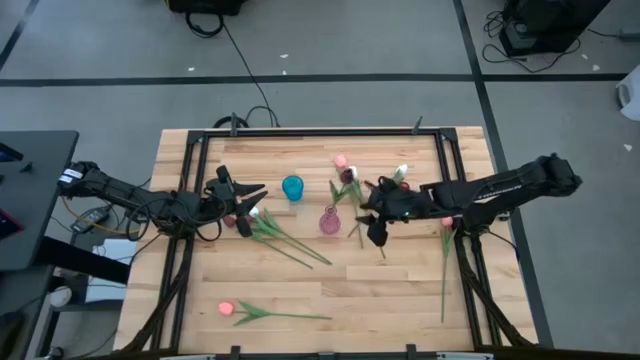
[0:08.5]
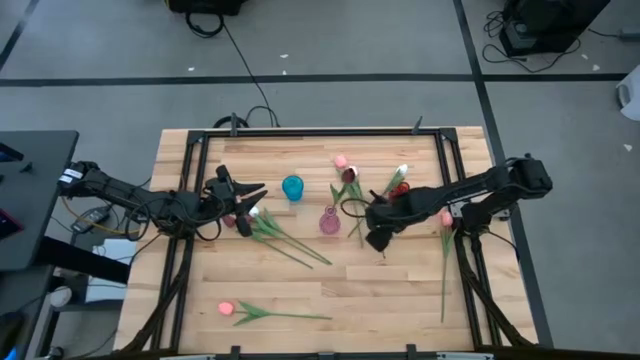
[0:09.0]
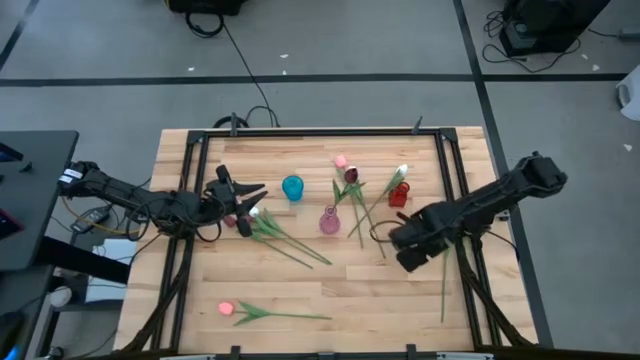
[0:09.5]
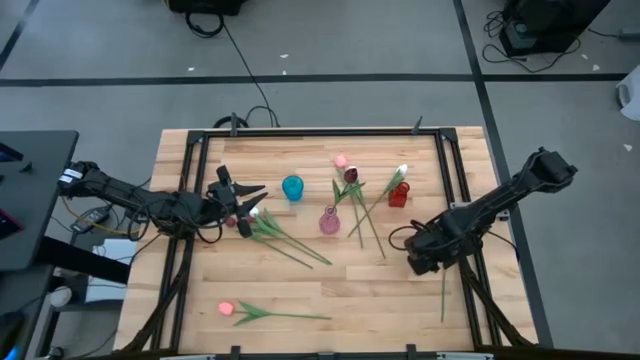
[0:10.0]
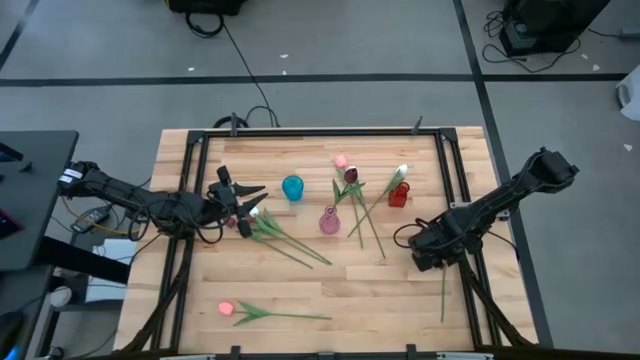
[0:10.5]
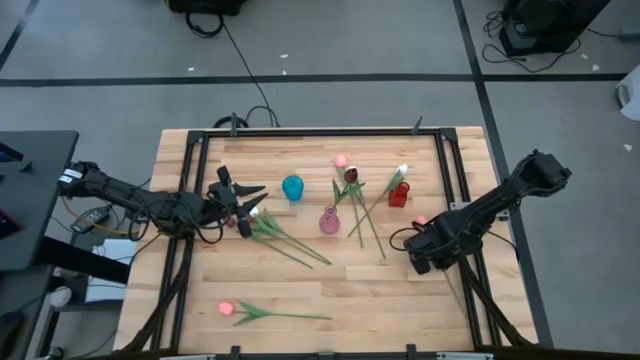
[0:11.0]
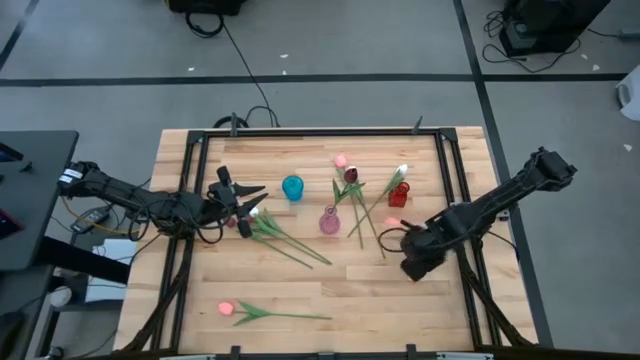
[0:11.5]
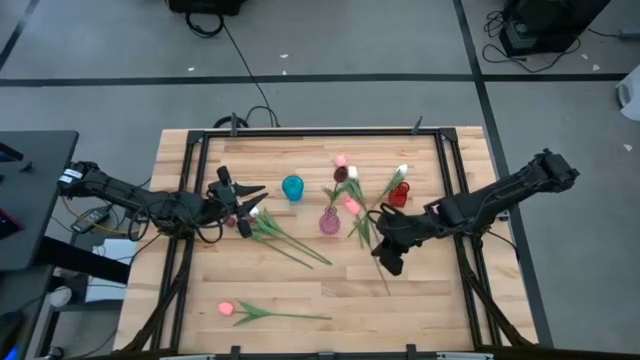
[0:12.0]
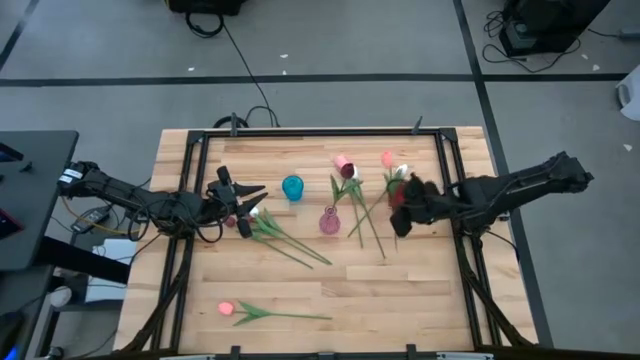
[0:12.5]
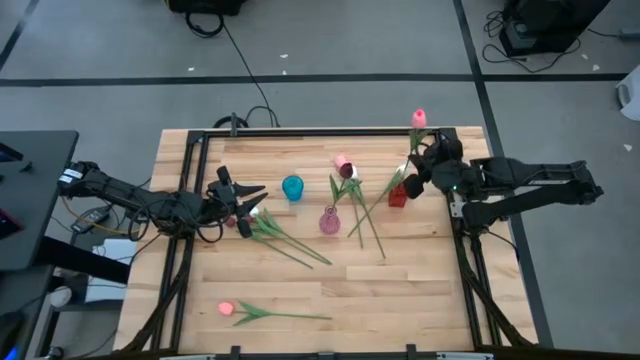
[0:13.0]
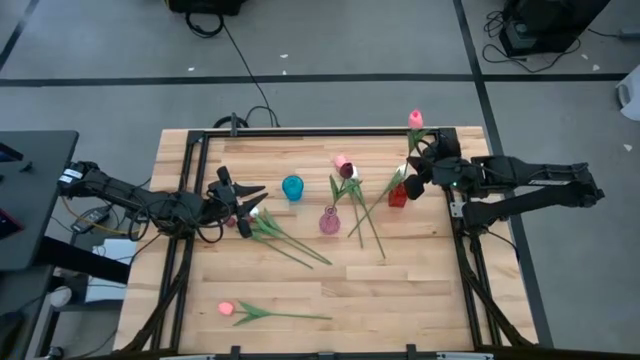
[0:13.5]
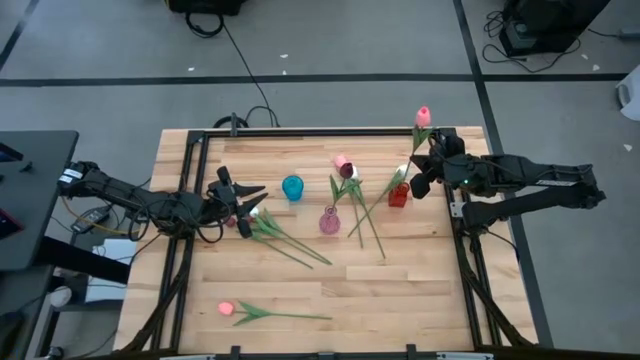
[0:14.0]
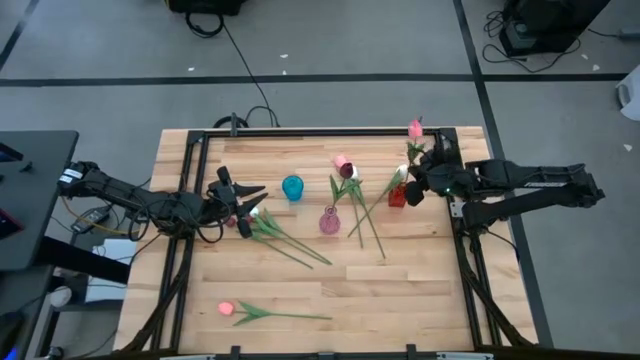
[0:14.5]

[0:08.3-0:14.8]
Task: Sort flowers into vase by color
Put the middle pink tulip into the red vase

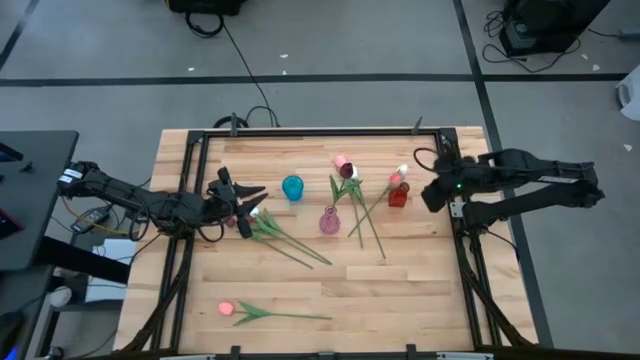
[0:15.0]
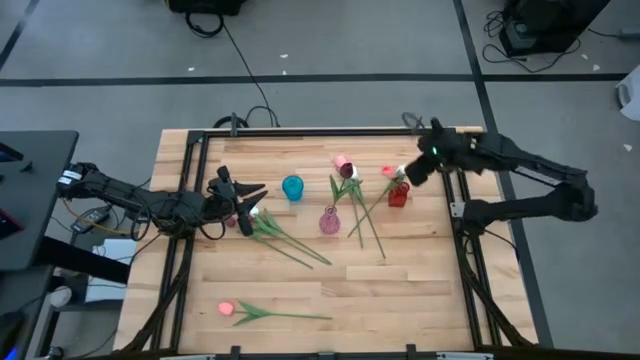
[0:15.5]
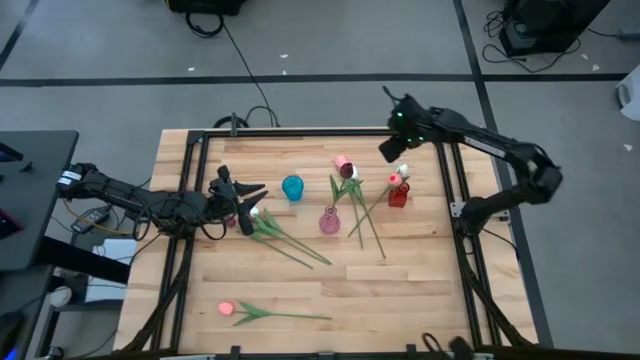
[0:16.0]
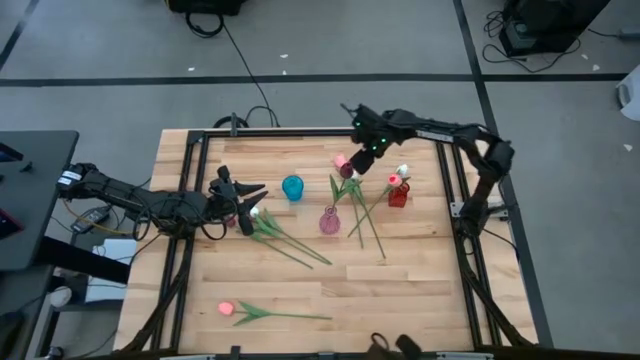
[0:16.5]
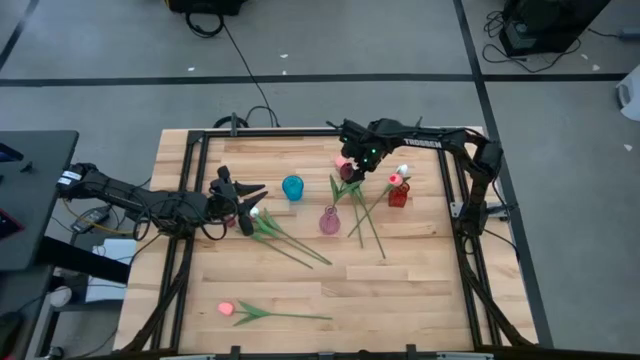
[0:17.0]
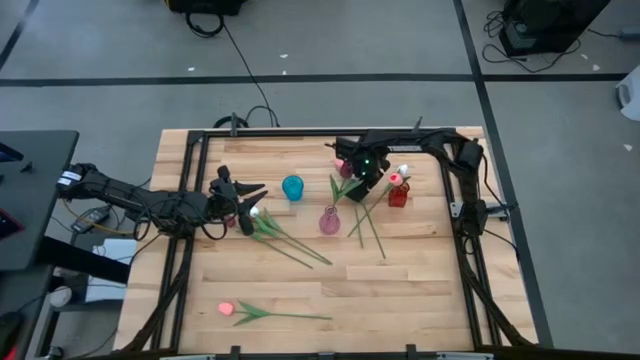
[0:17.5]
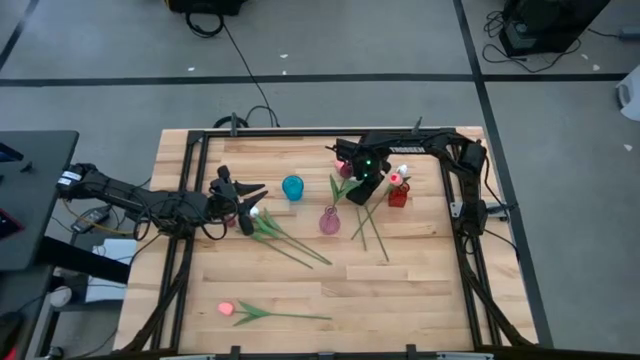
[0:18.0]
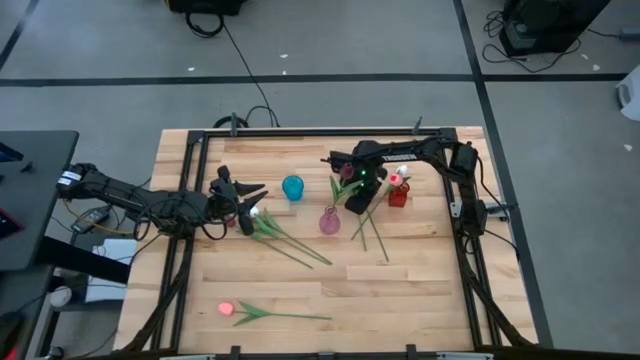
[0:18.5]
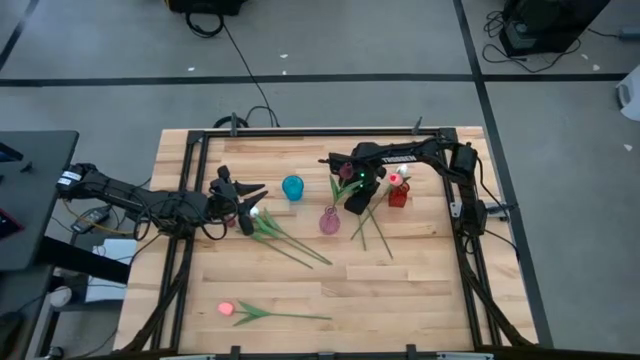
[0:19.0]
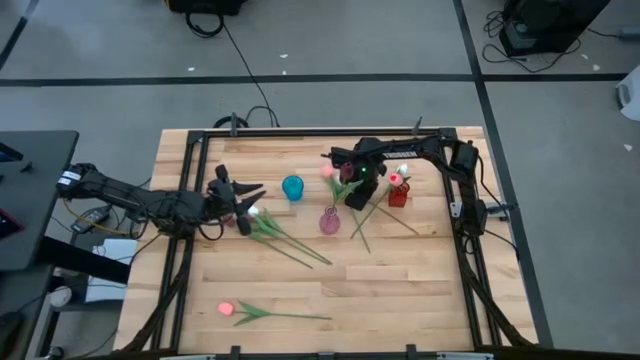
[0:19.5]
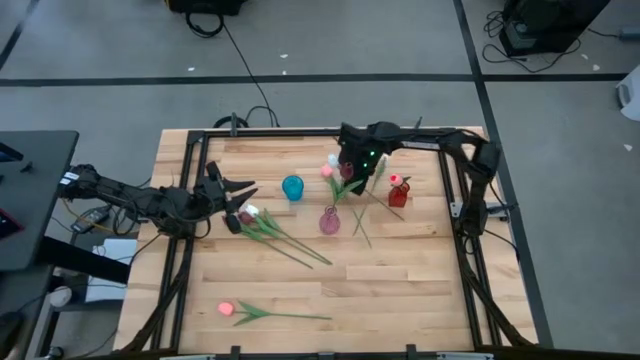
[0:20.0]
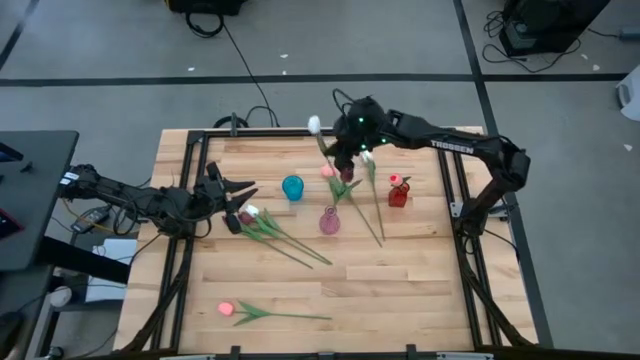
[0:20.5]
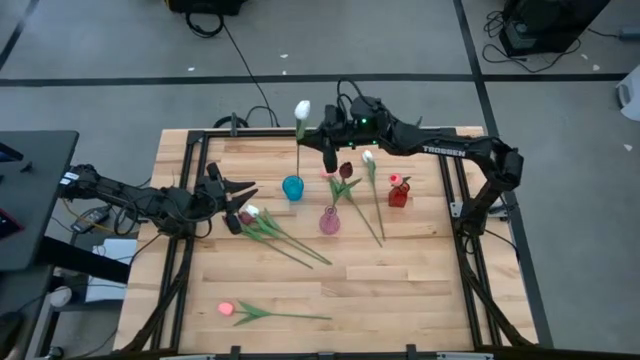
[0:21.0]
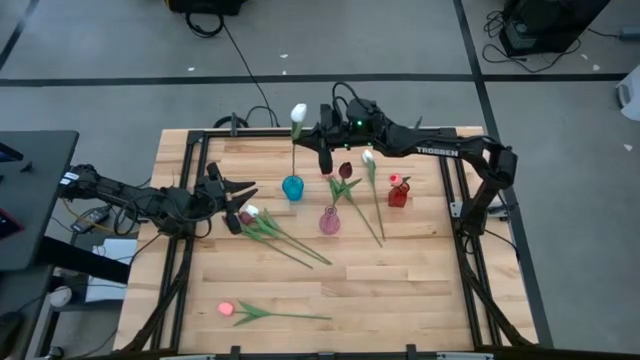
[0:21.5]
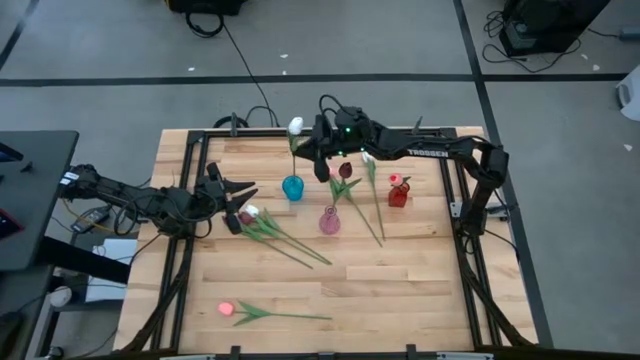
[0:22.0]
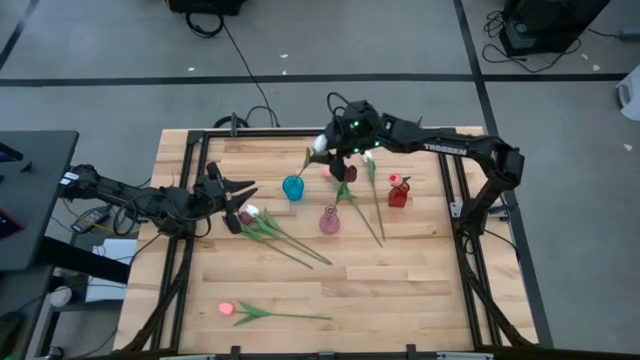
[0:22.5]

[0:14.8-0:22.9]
Put the middle white tulip into the blue vase

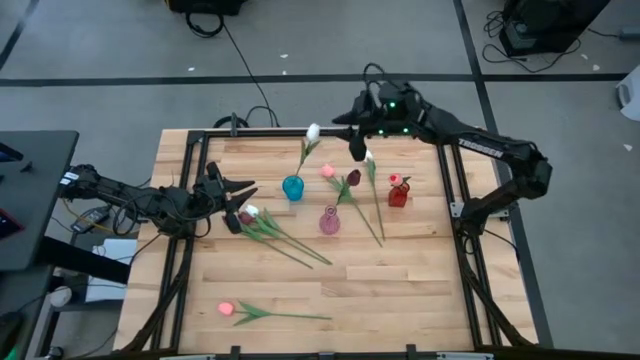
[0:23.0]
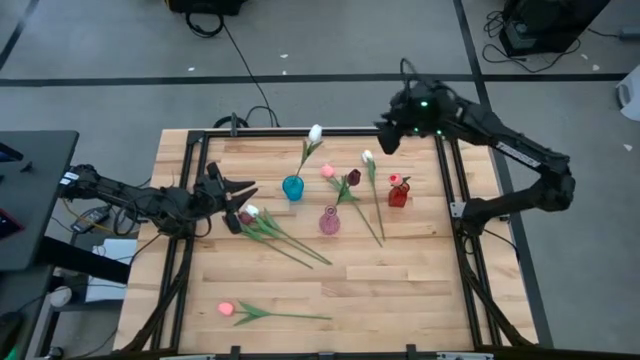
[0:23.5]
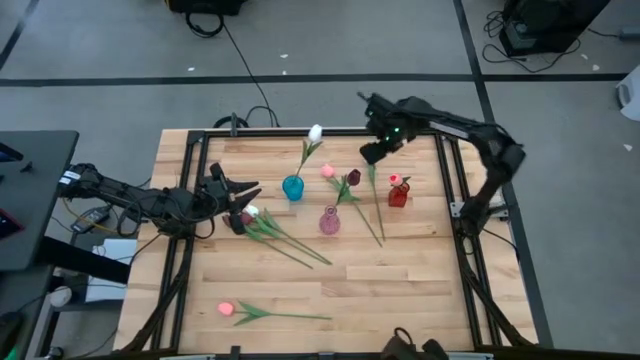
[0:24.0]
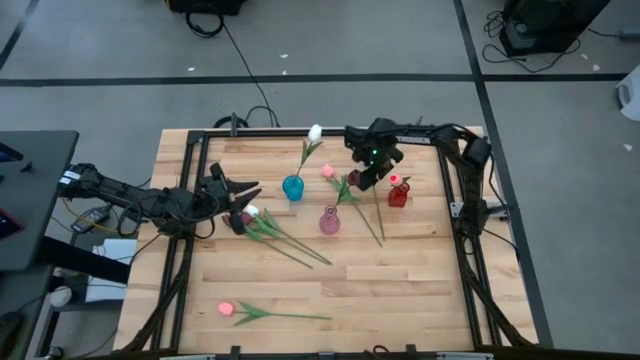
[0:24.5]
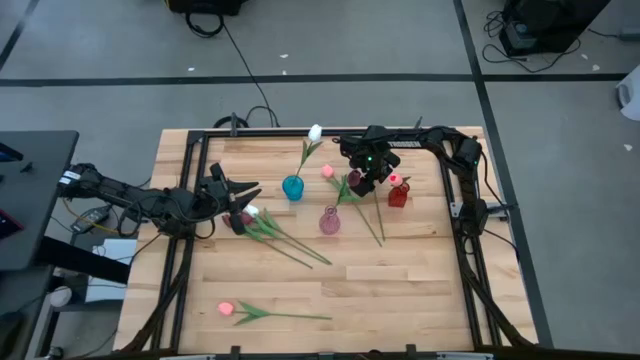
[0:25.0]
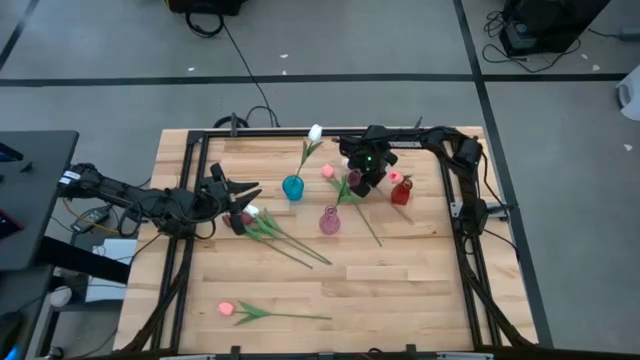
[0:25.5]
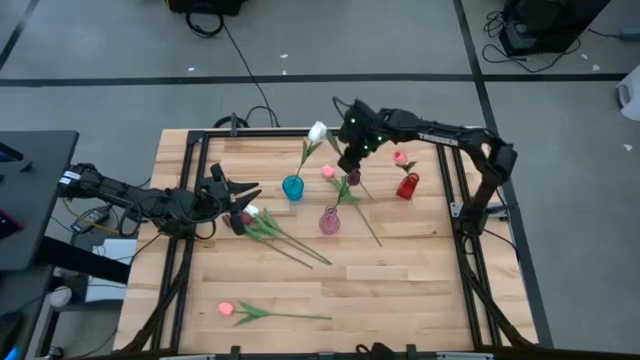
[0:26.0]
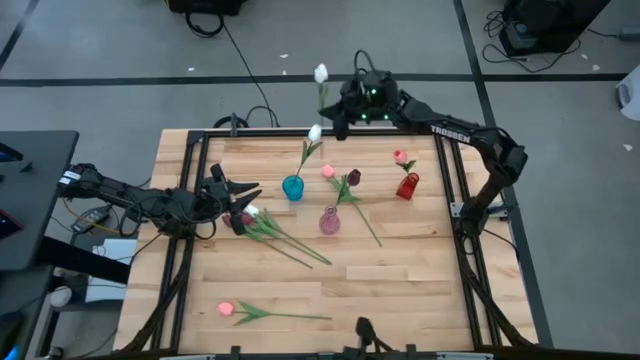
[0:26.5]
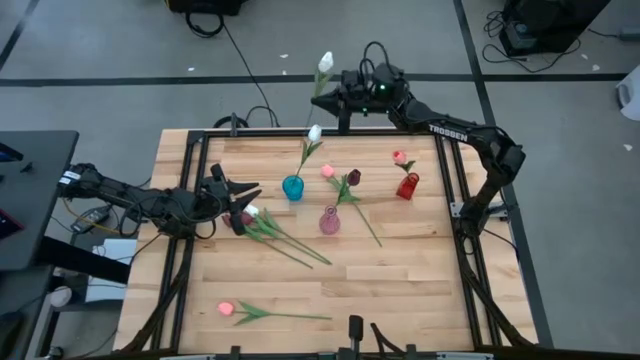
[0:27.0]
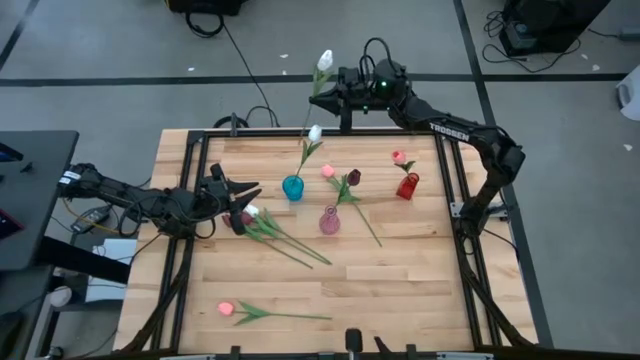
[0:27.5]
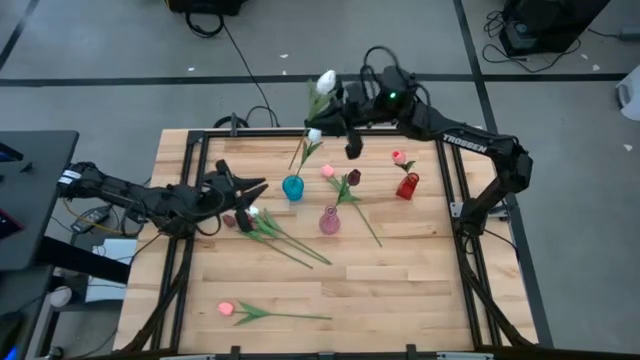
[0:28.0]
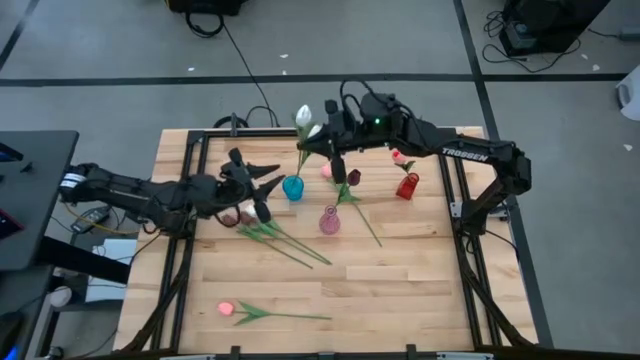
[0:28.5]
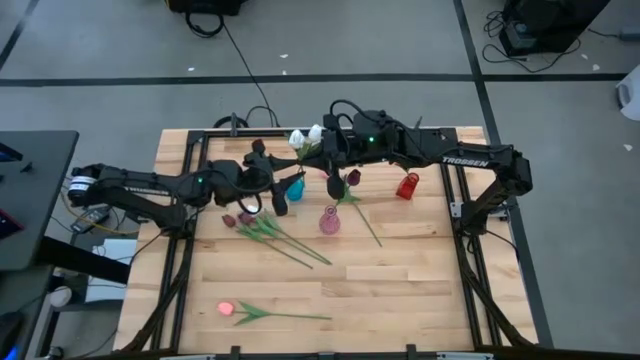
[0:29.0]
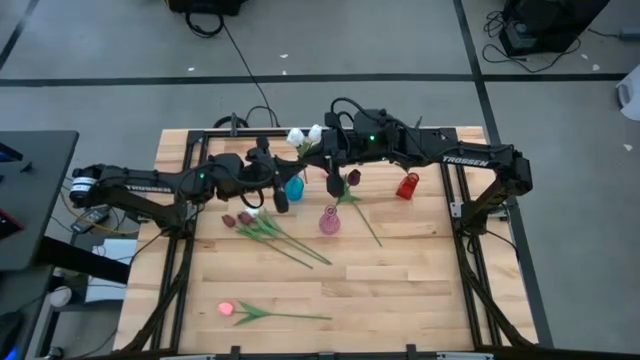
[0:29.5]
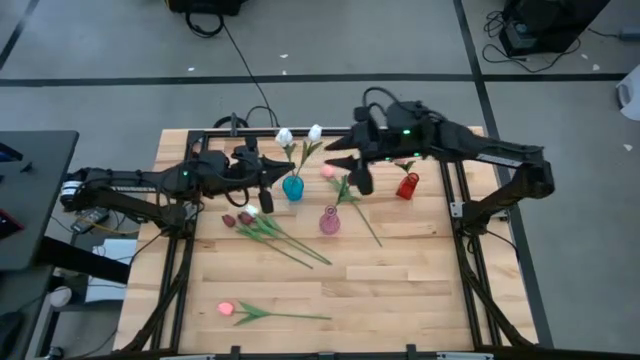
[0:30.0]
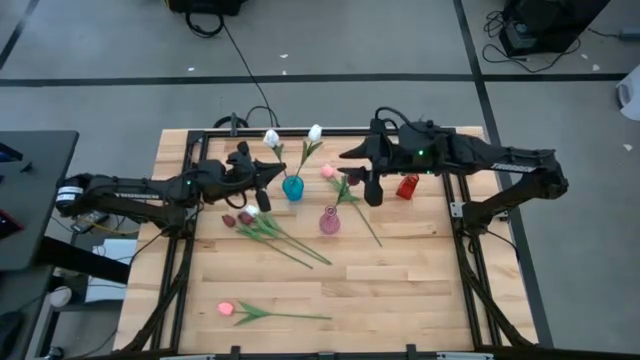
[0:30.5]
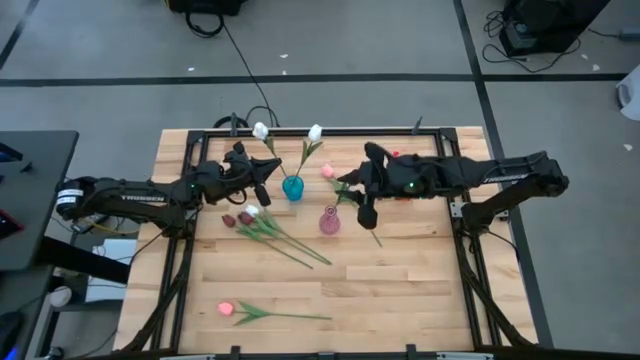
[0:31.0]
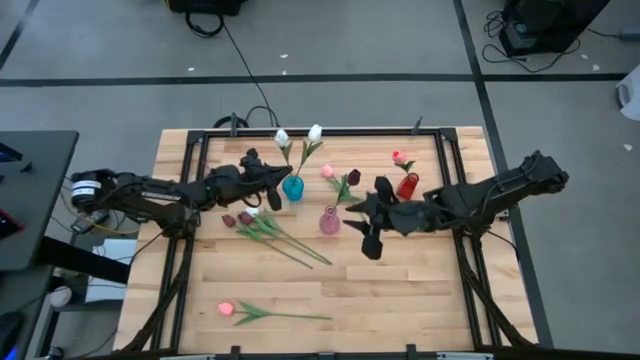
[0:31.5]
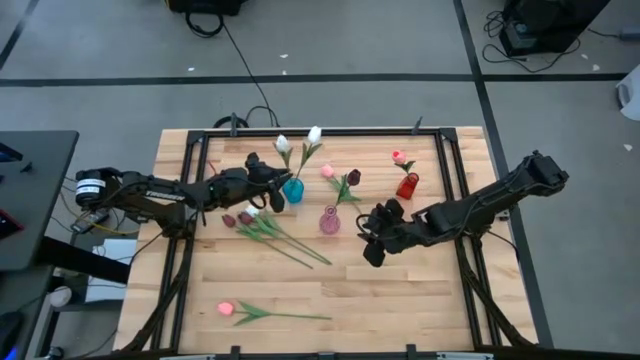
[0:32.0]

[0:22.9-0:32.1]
Put the right white tulip into the blue vase
